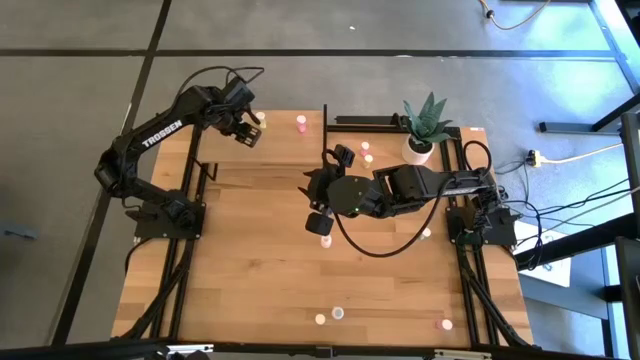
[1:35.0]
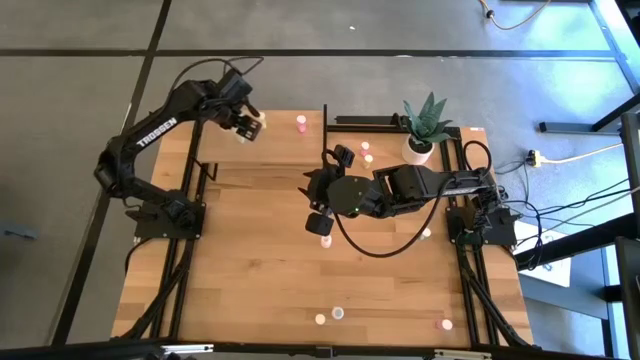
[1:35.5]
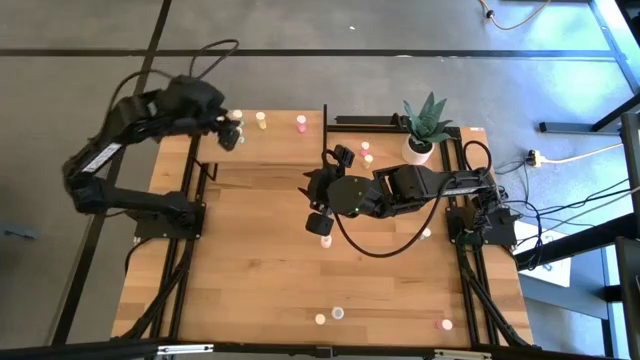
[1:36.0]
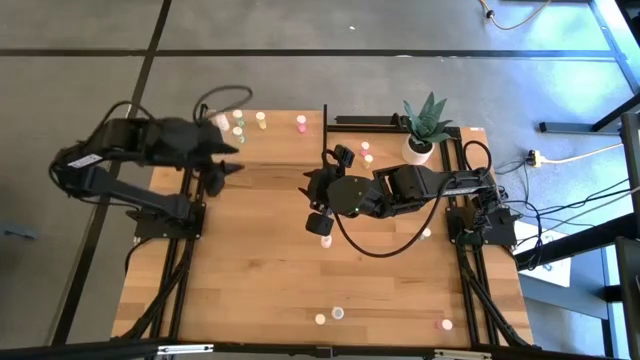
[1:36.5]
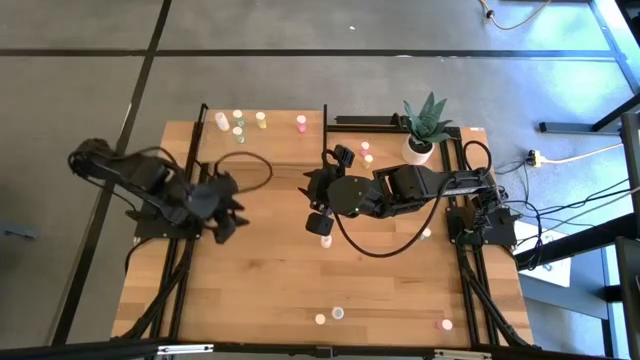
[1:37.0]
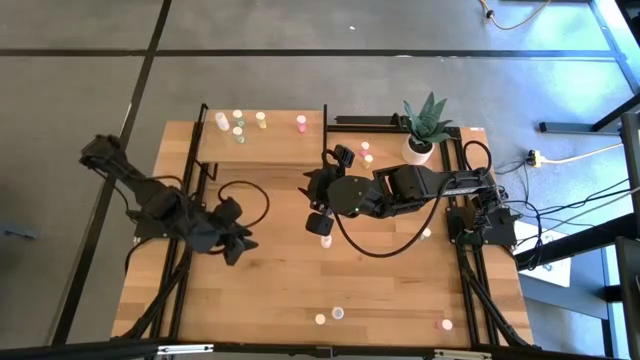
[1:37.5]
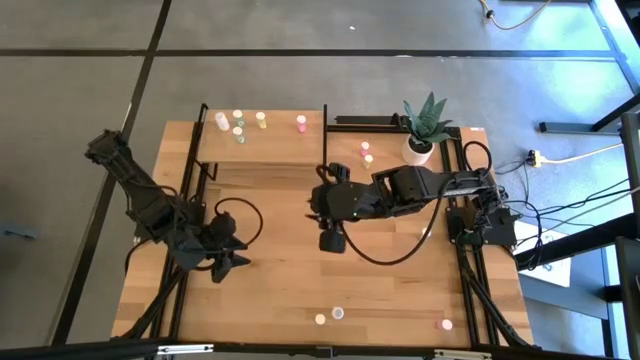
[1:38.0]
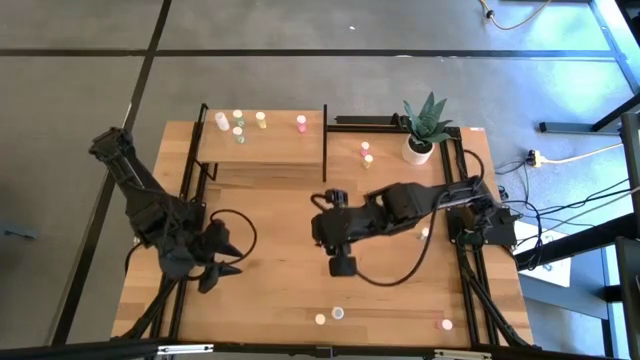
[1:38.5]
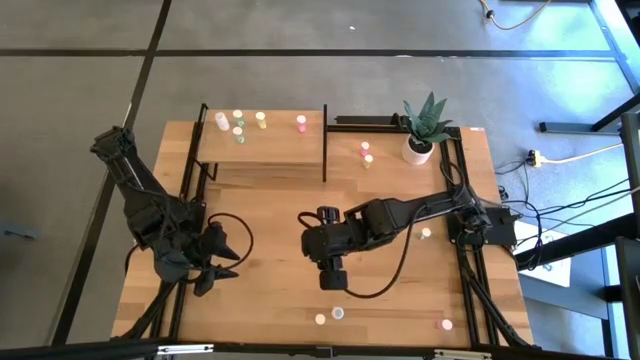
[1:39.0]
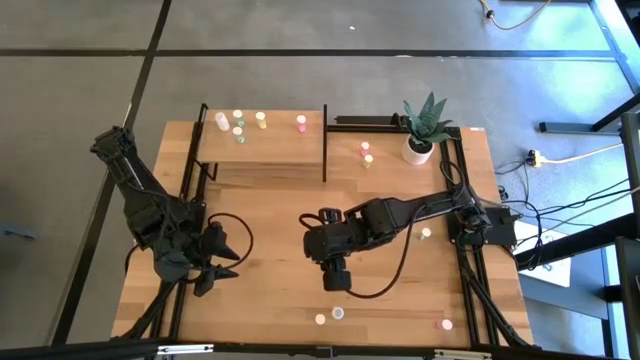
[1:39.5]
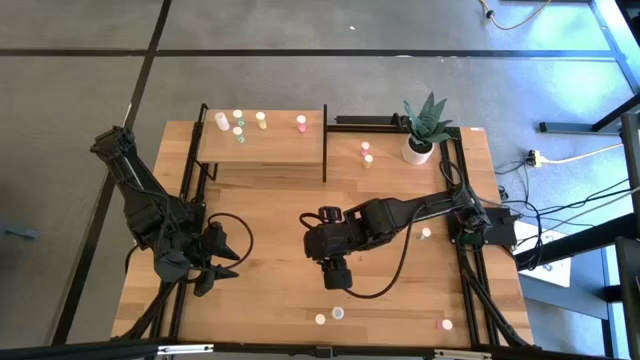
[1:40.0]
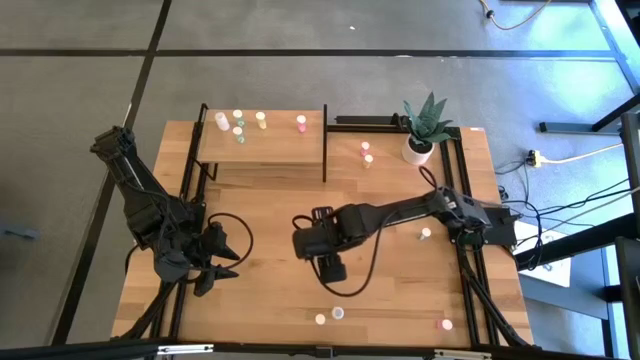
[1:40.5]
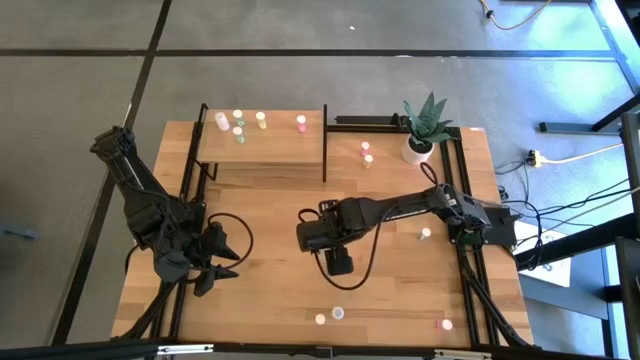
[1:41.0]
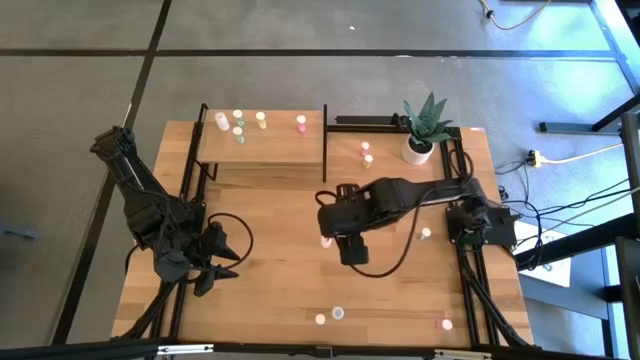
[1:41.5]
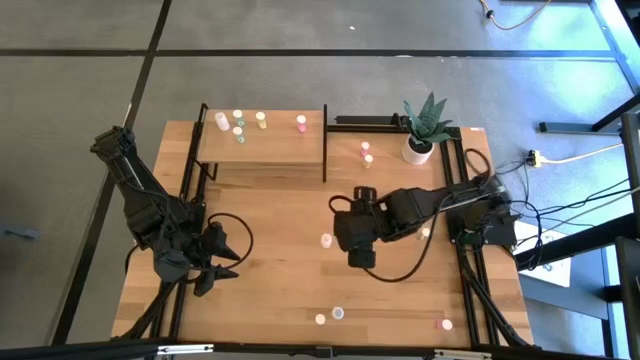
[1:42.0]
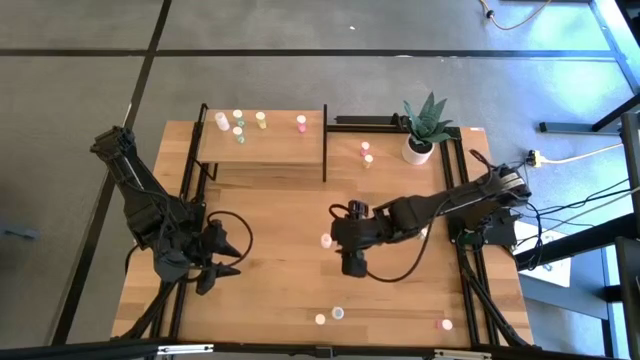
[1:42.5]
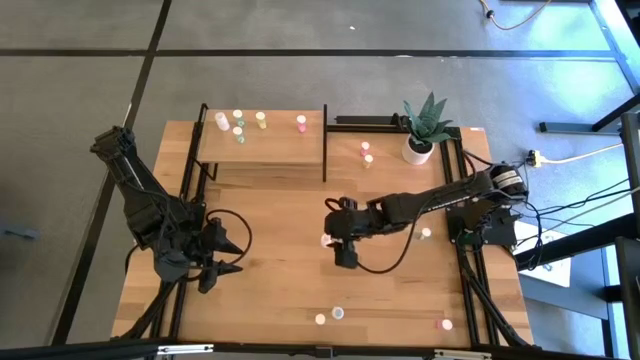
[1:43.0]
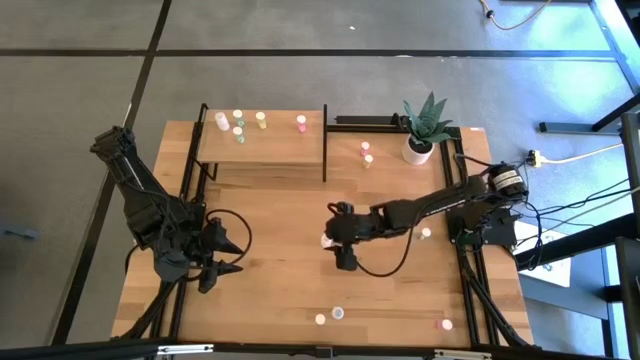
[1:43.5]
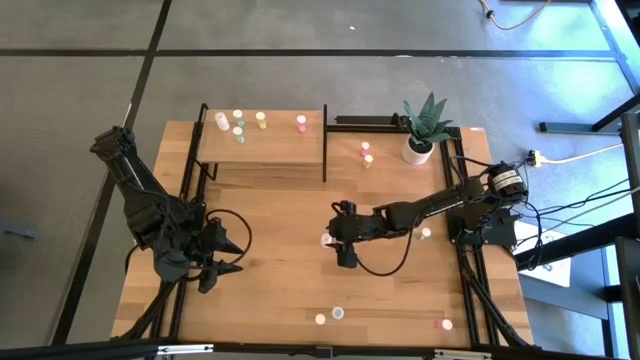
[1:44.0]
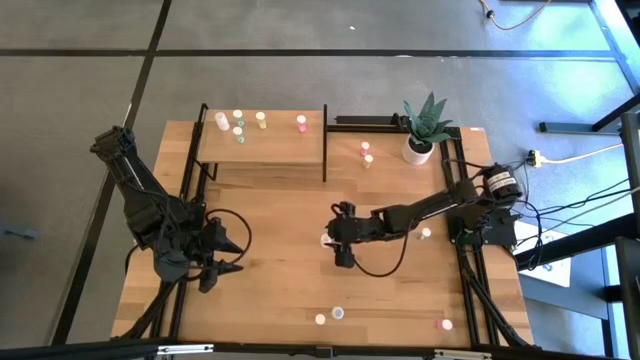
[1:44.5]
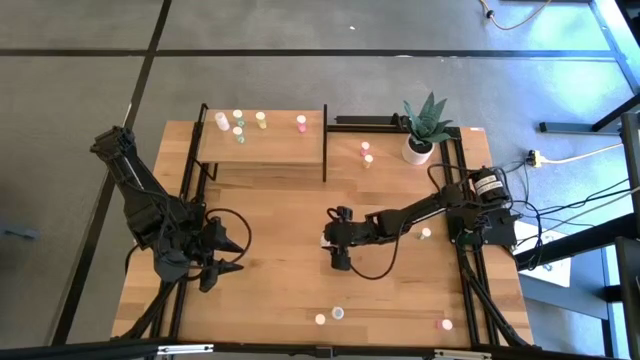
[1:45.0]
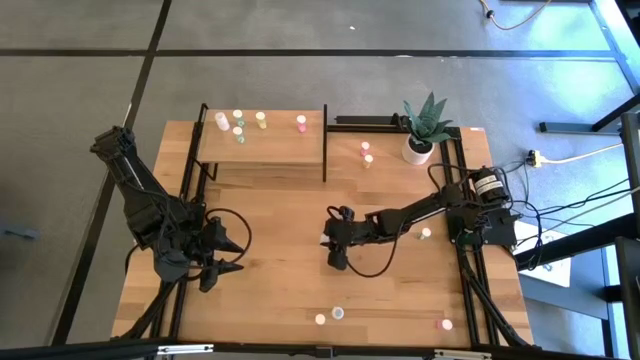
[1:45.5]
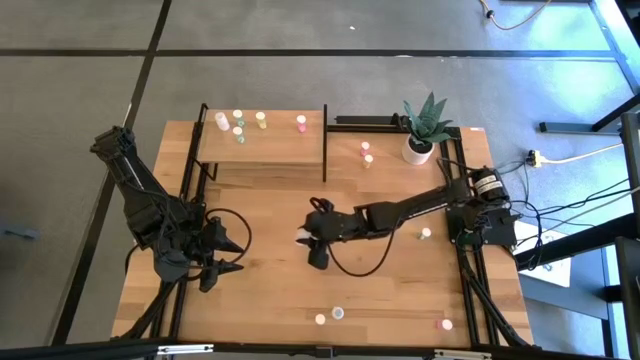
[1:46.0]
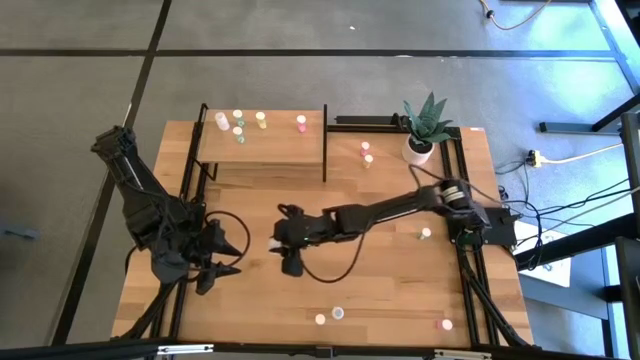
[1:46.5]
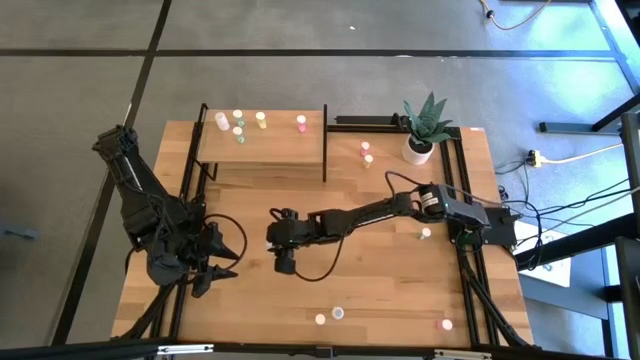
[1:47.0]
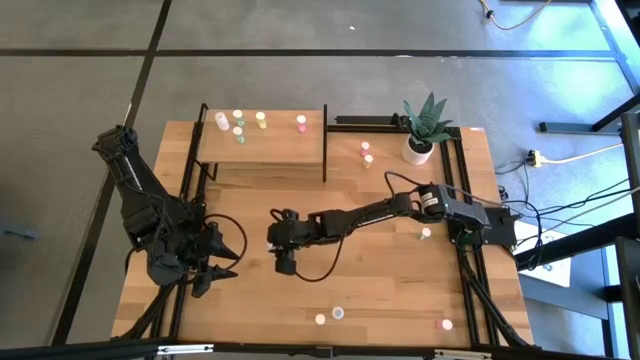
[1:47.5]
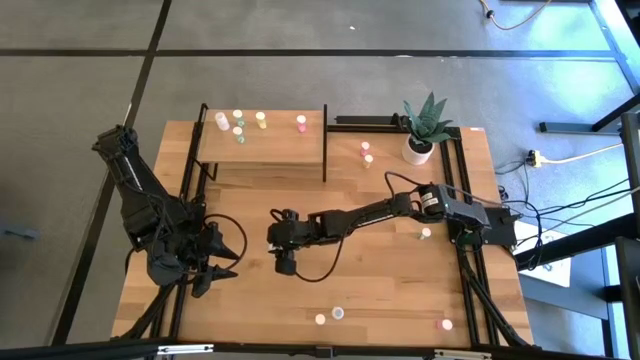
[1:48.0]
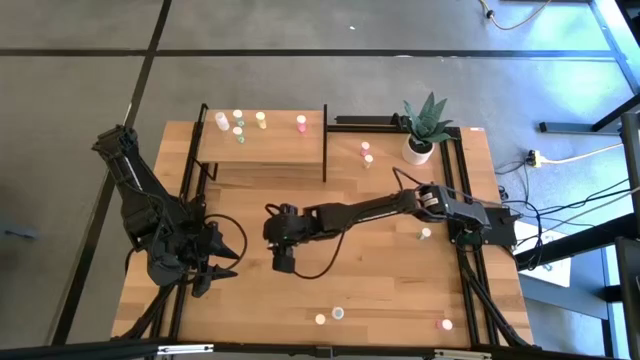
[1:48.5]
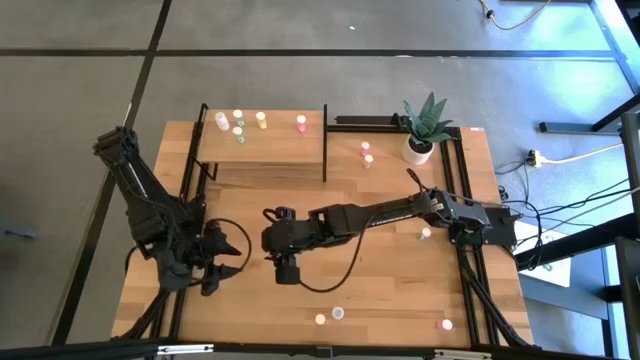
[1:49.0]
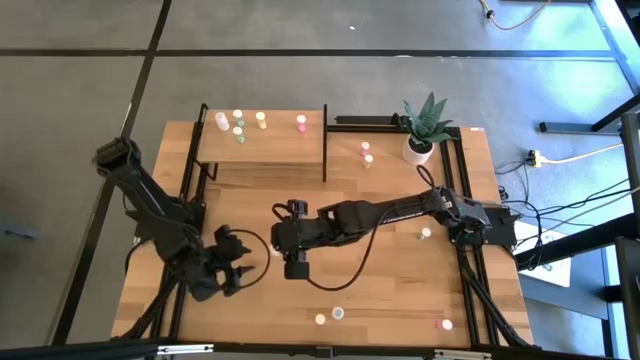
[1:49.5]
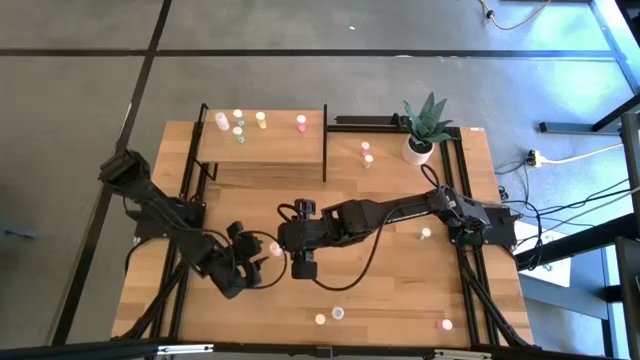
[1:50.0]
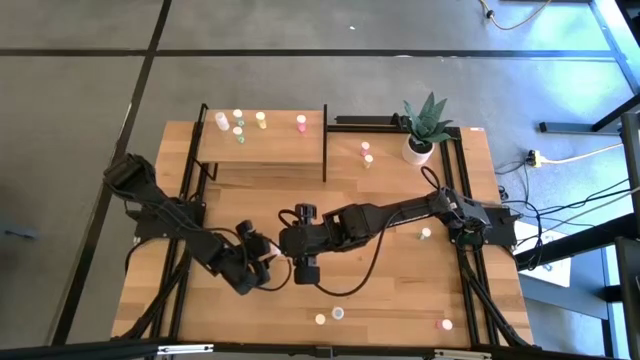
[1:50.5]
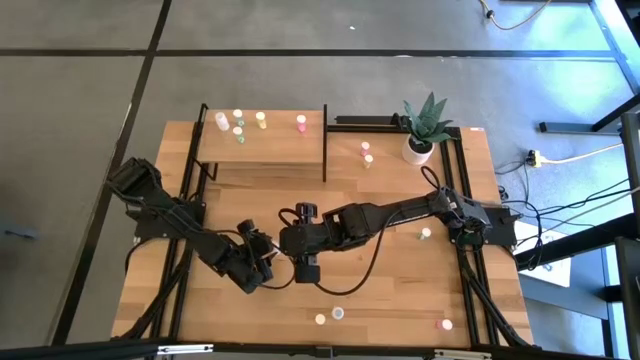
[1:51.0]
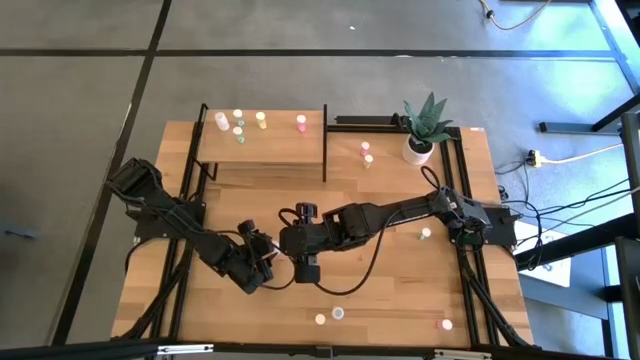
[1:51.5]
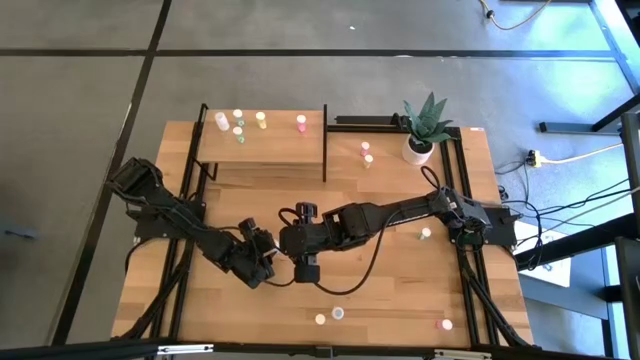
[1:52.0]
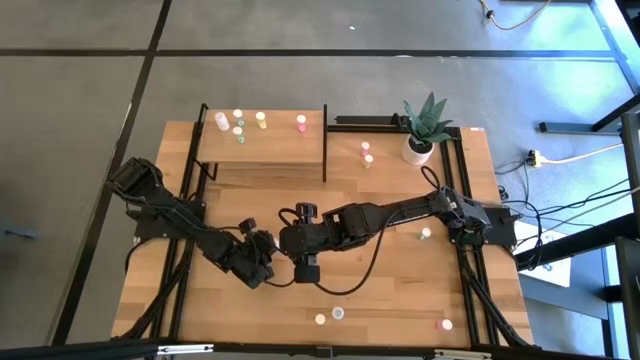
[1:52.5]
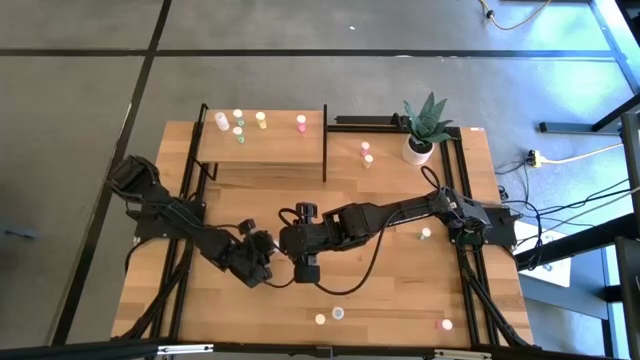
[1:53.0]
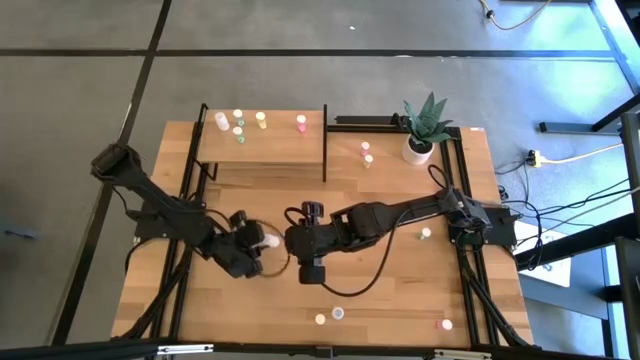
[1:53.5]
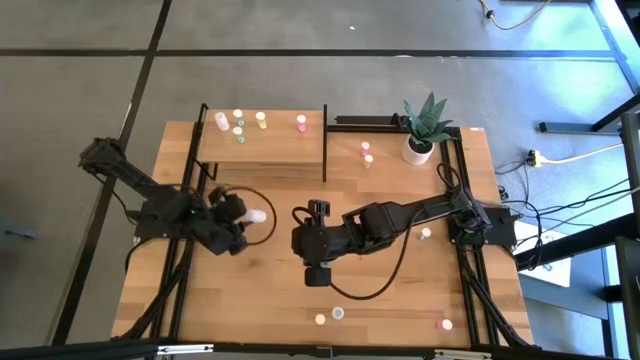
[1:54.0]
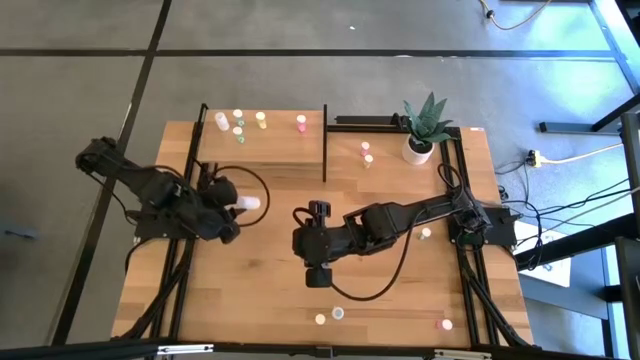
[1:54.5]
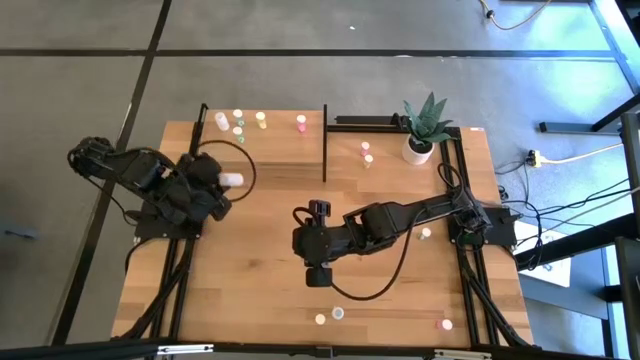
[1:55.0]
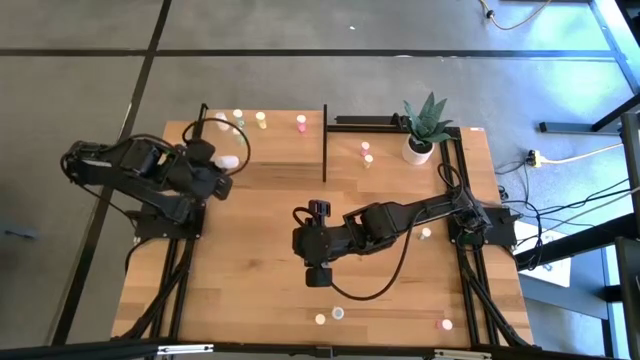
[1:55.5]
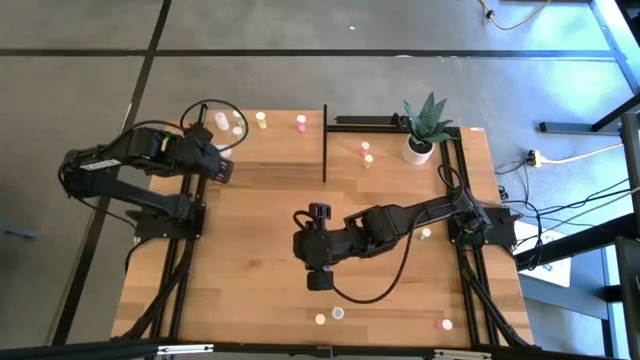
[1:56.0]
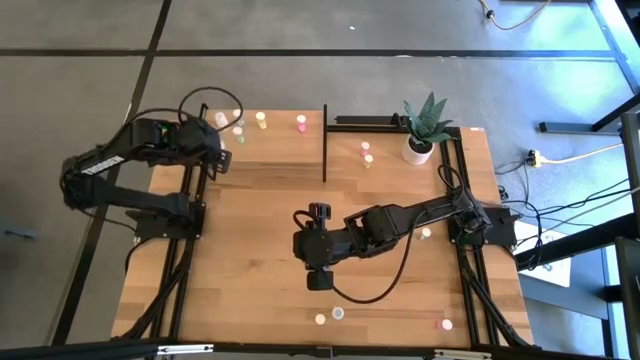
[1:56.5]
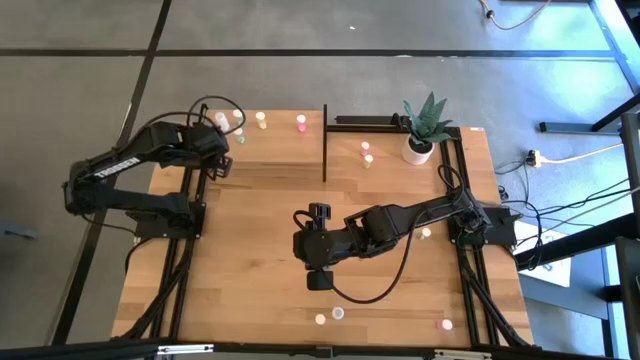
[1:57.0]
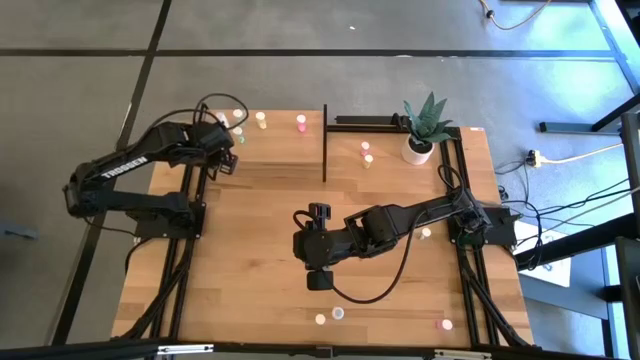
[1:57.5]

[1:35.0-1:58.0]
Task: Pick and place medicine bottles onto shelf by color
Put the top white pill bottle aligned with the other white pill bottle on the shelf
